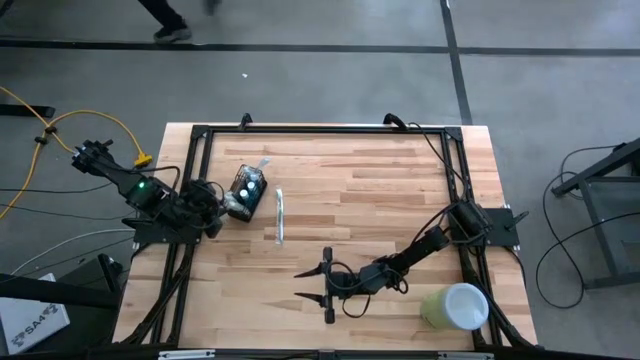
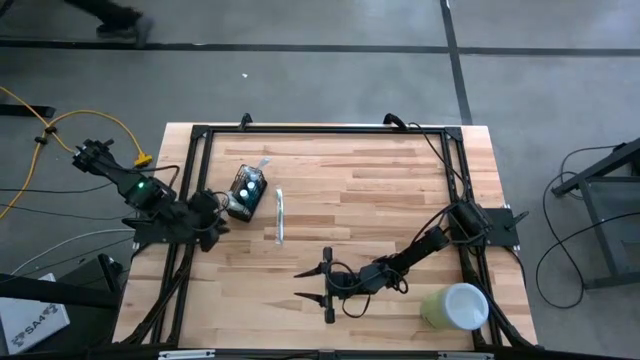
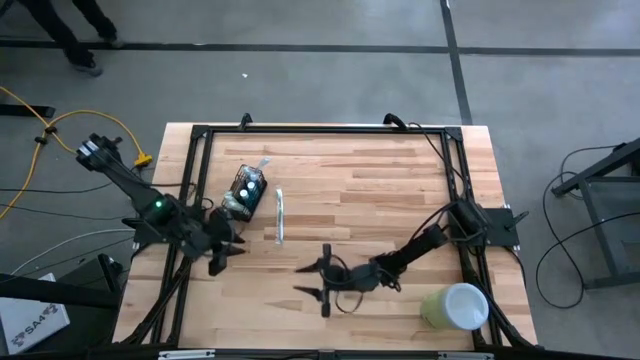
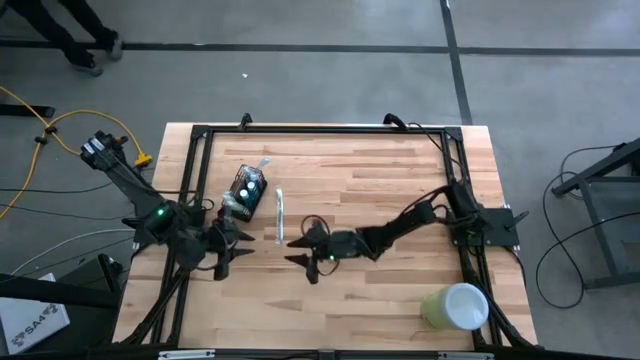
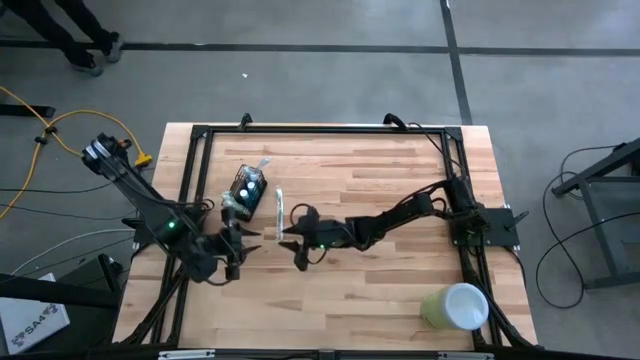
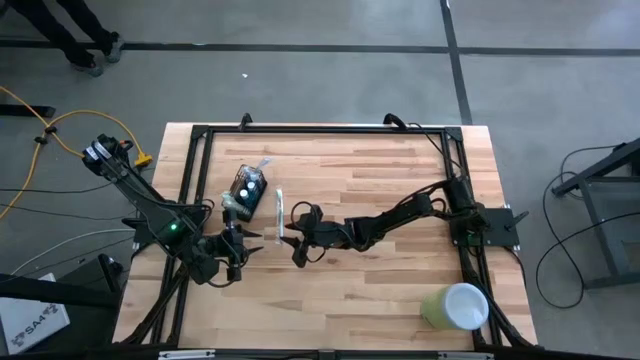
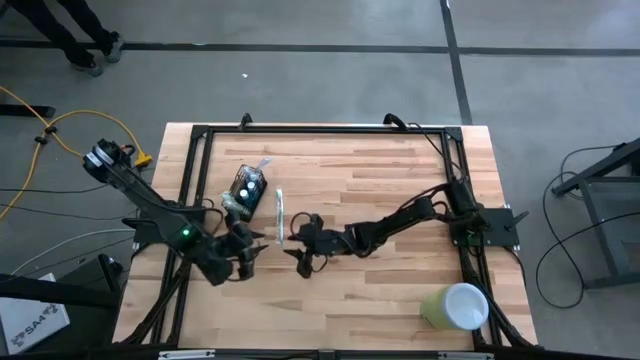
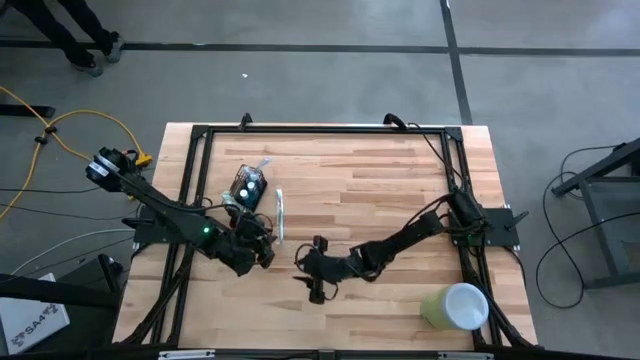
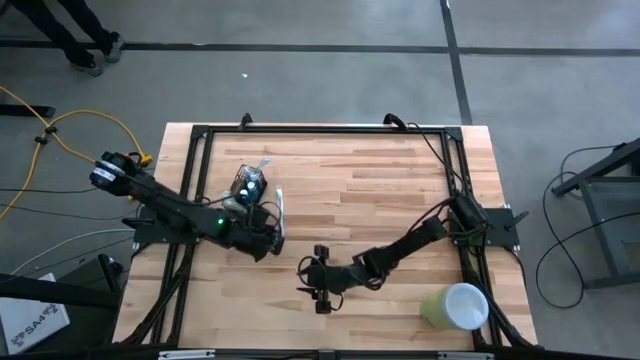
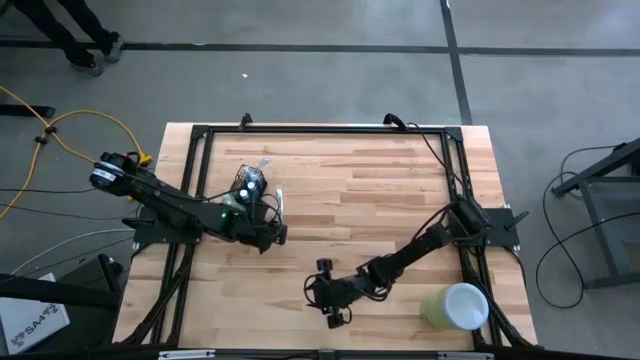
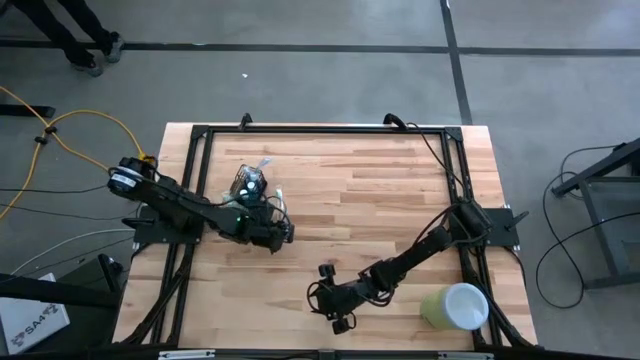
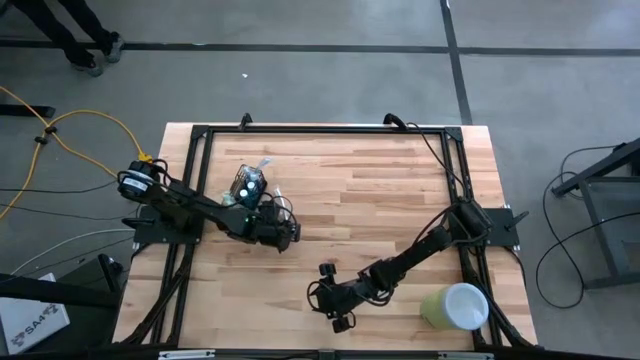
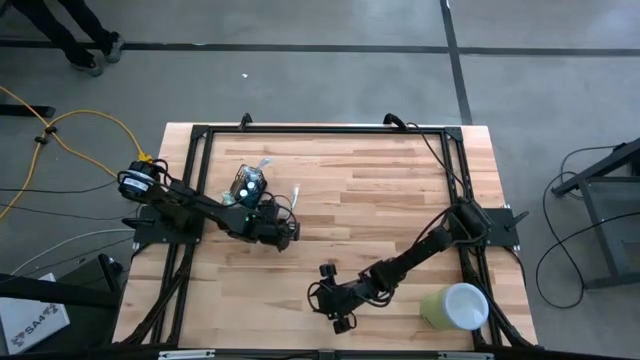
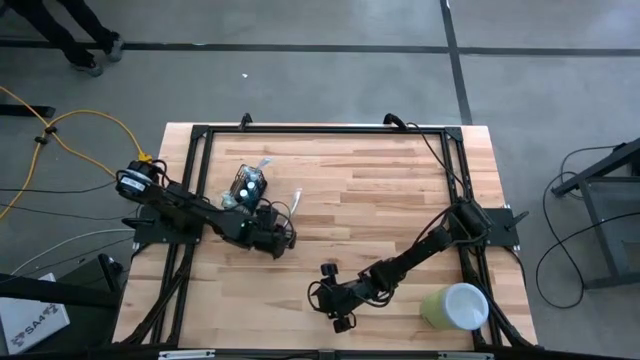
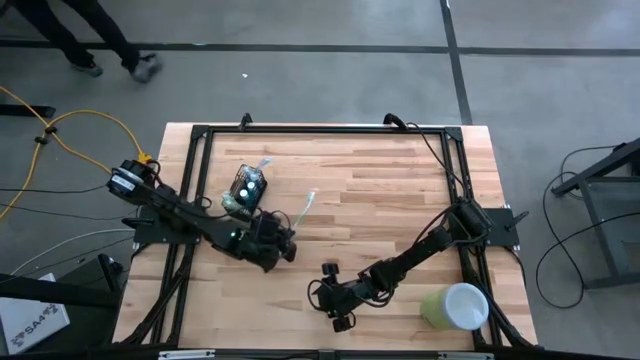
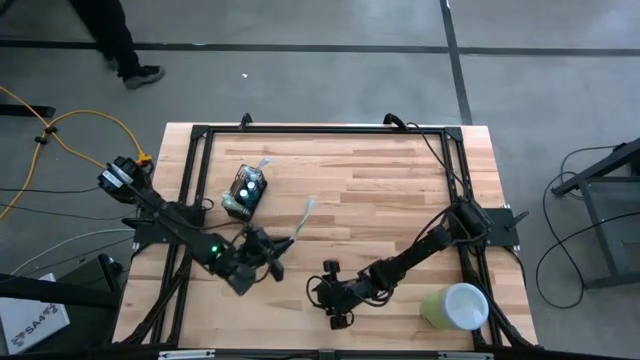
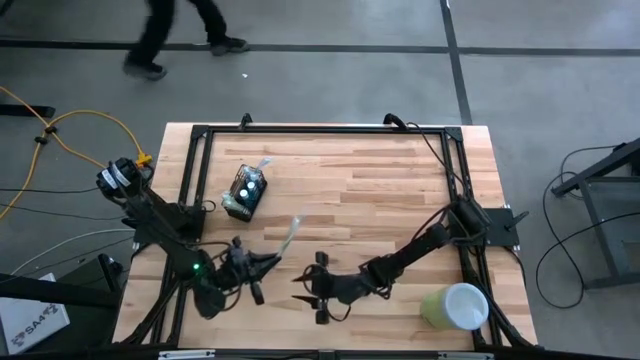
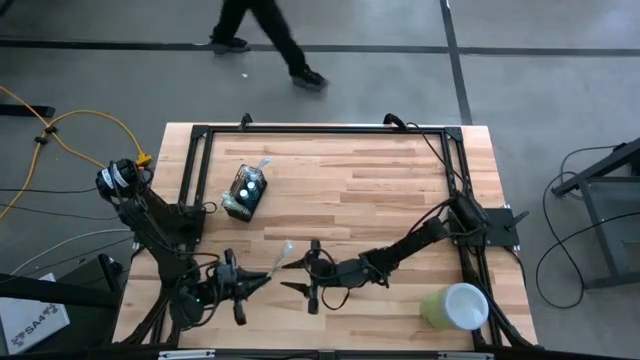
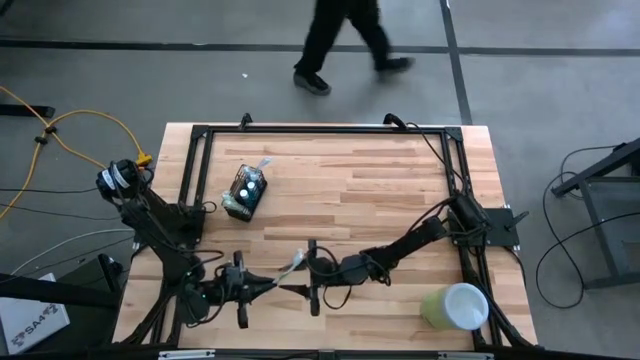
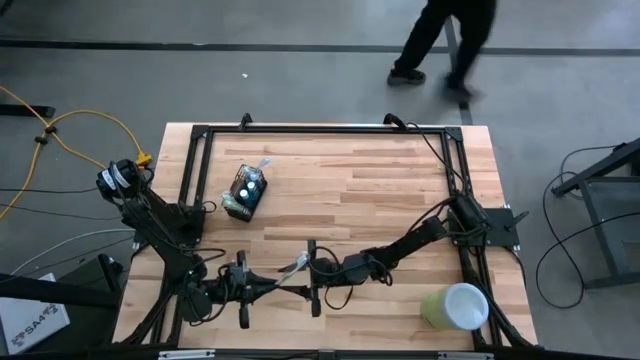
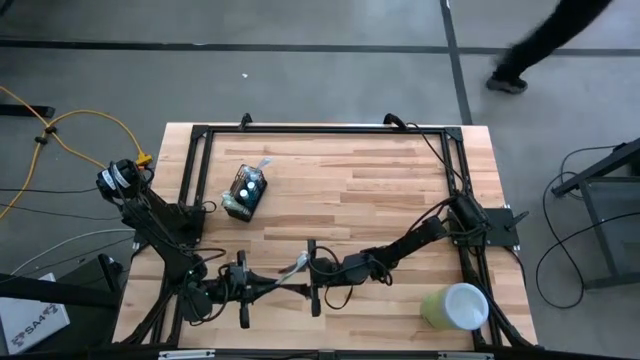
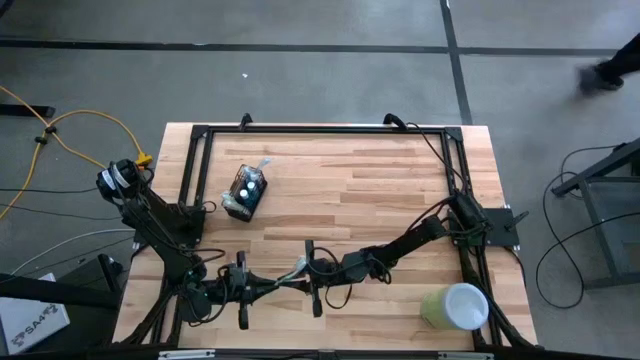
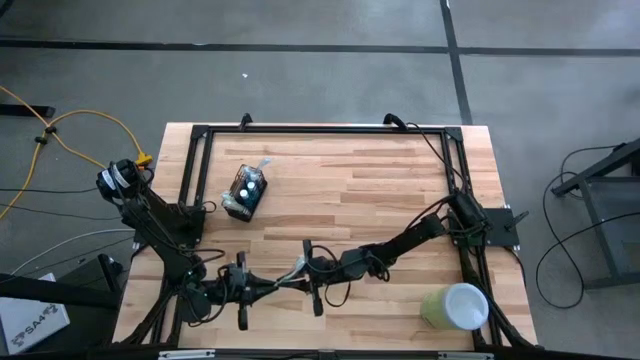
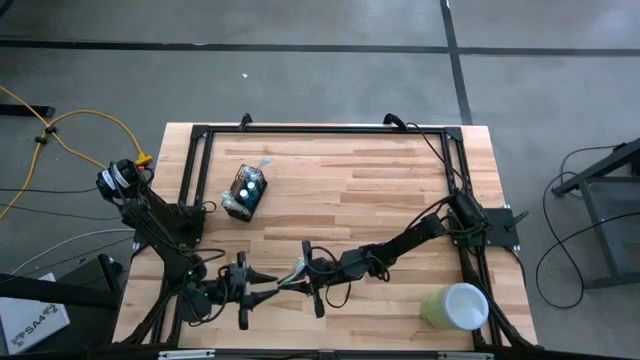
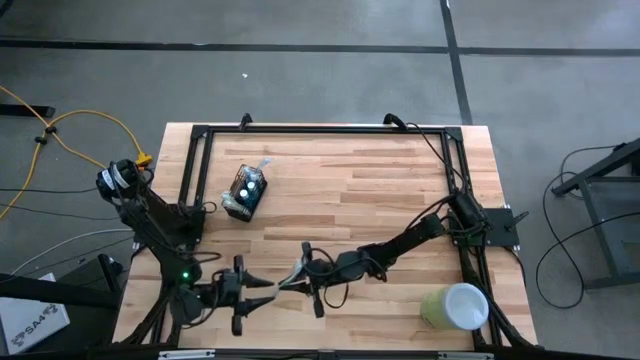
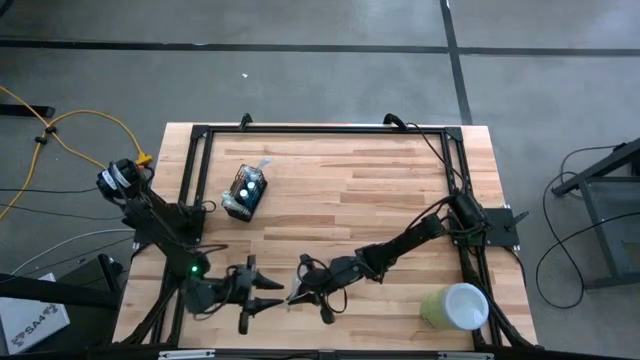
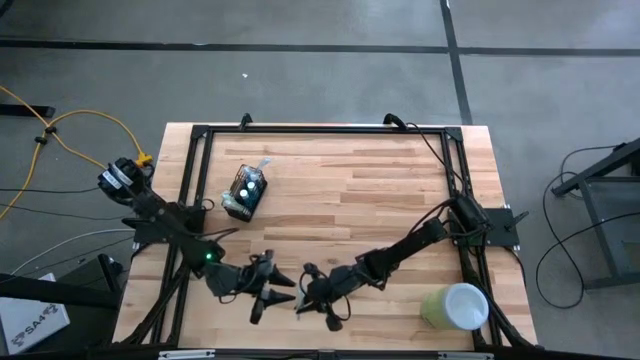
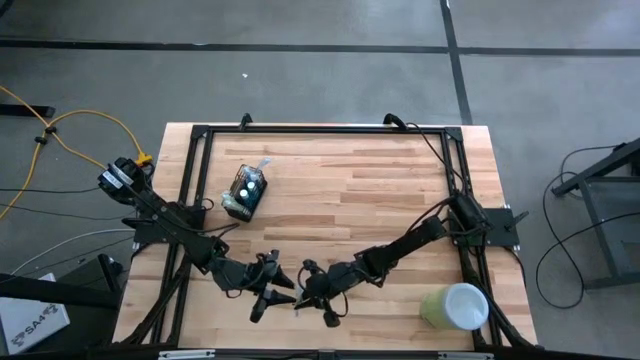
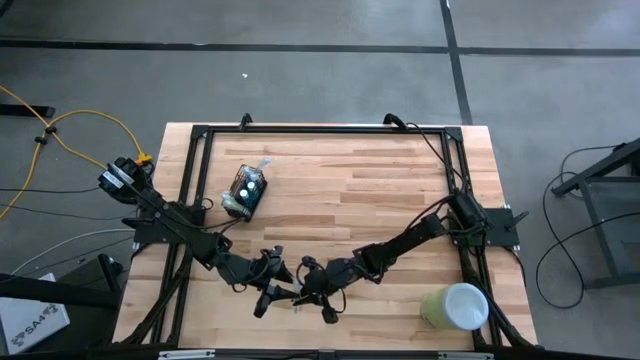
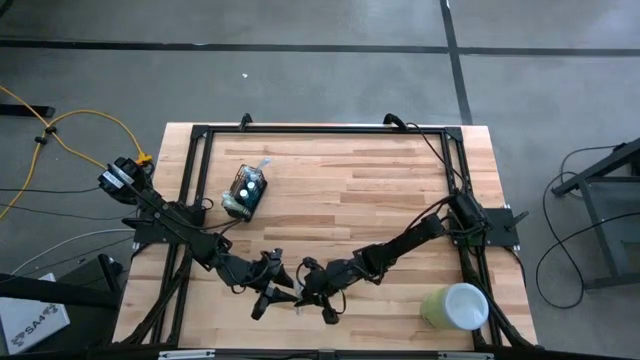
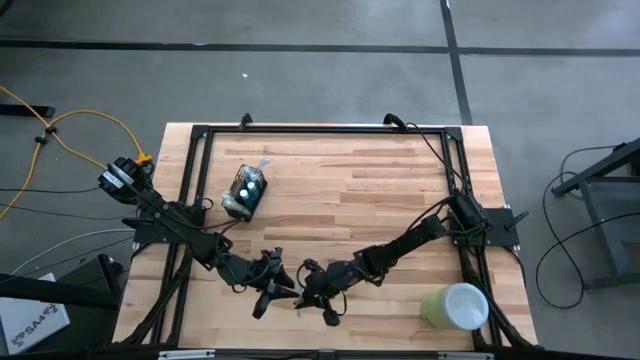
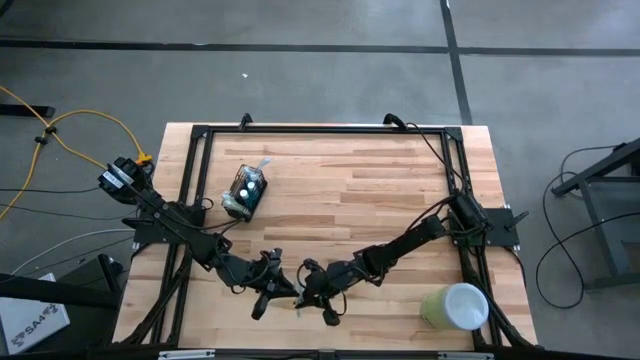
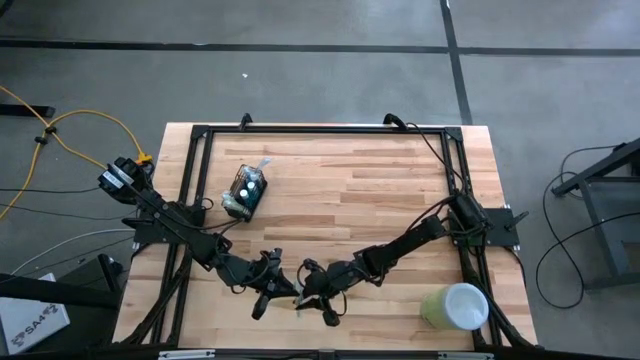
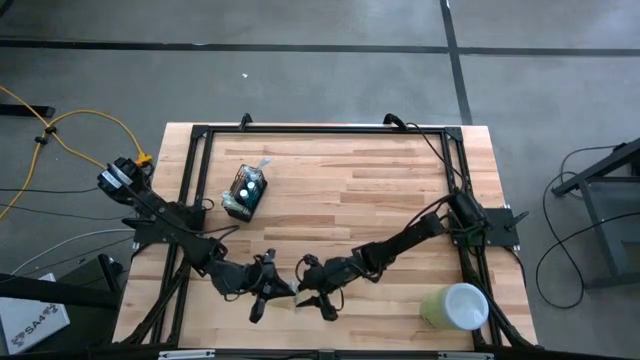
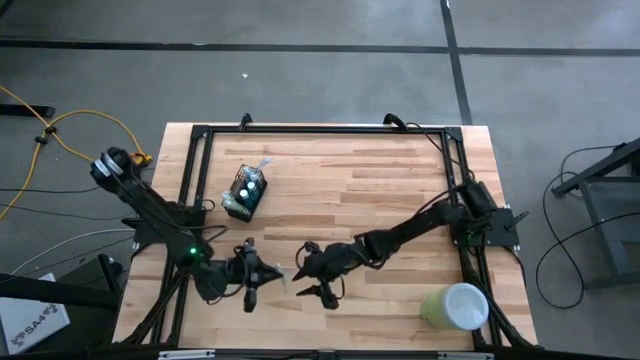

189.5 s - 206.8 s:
Task: Pick & Place toothbrushing station
Put the green toothbrush into the black wire organizer

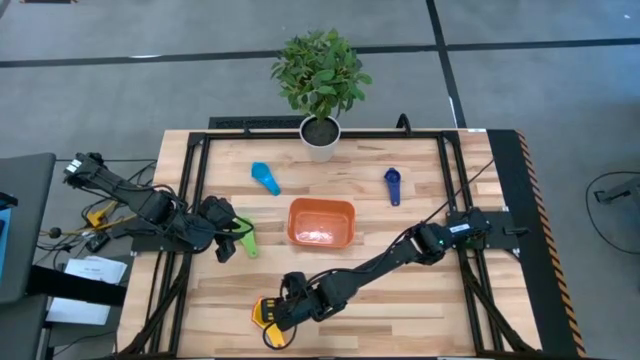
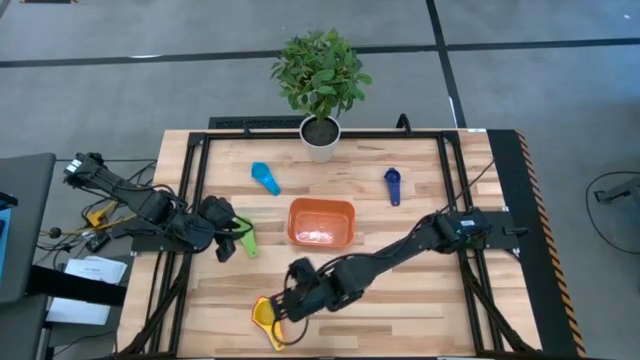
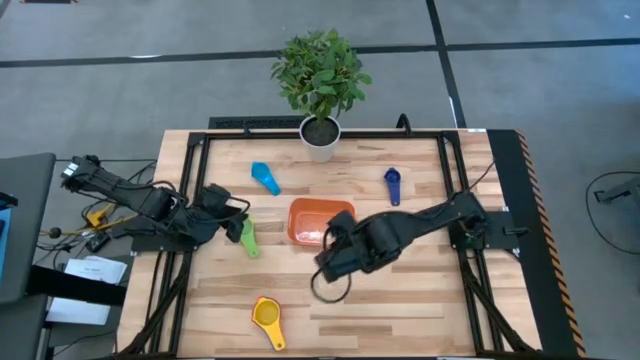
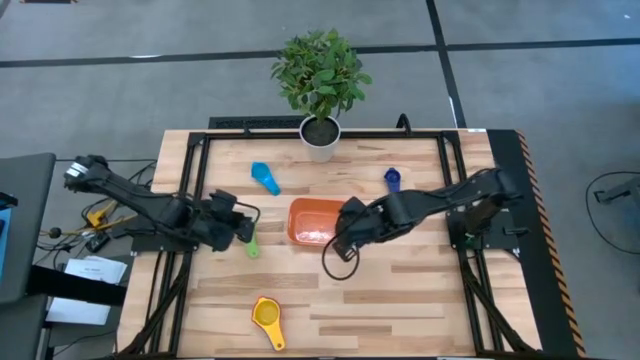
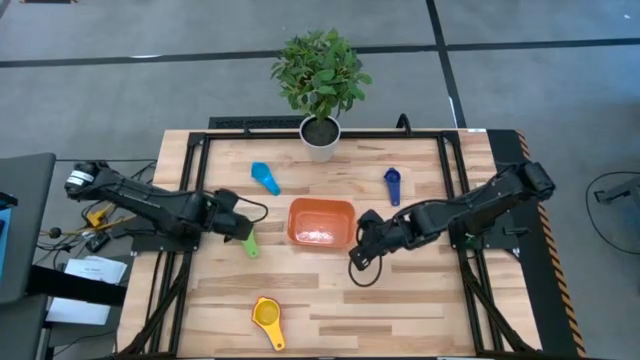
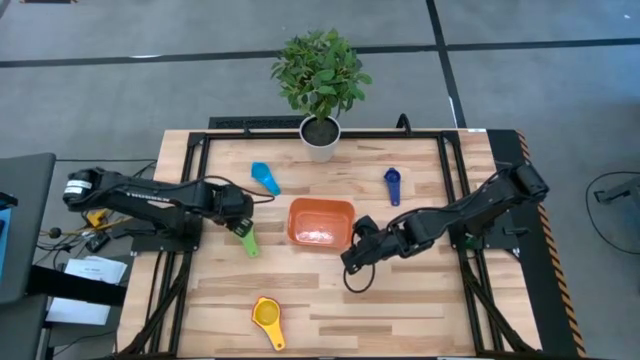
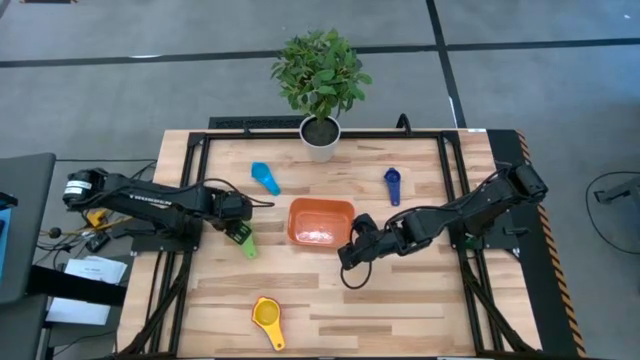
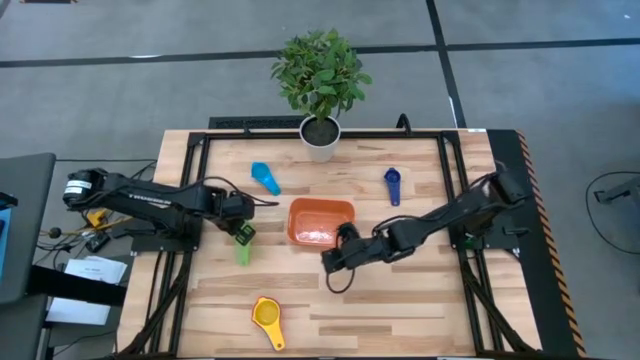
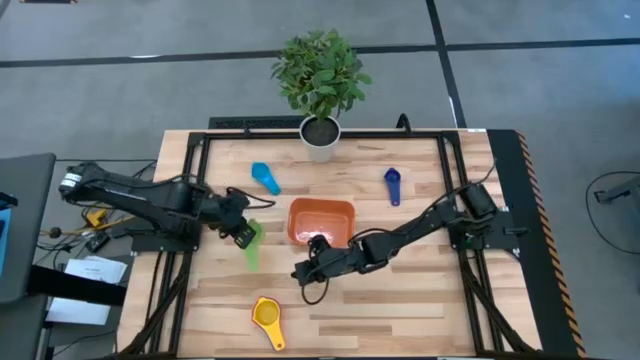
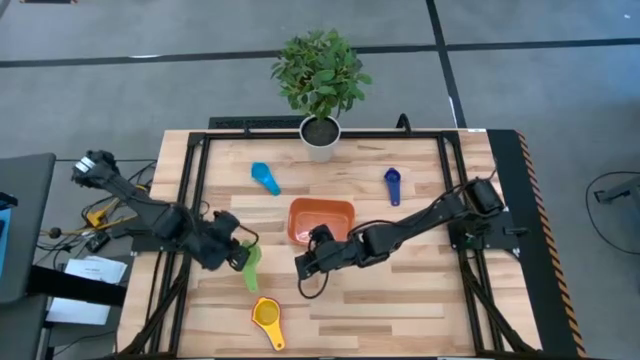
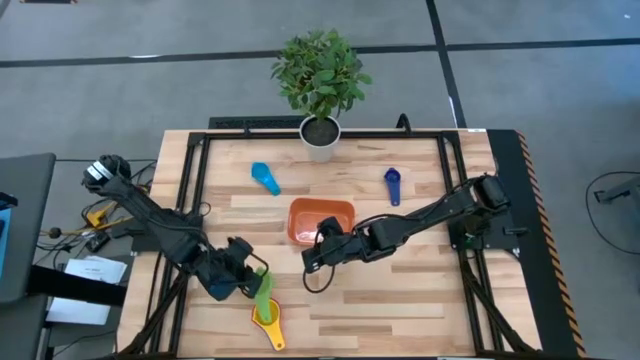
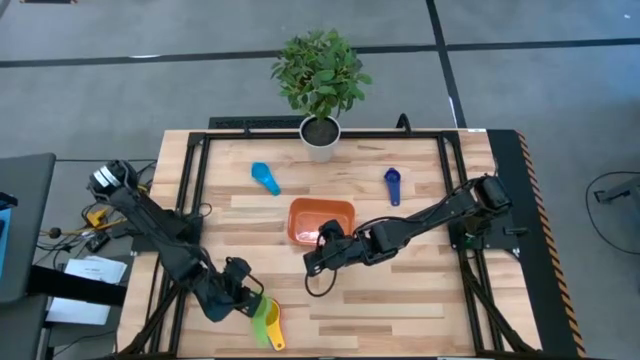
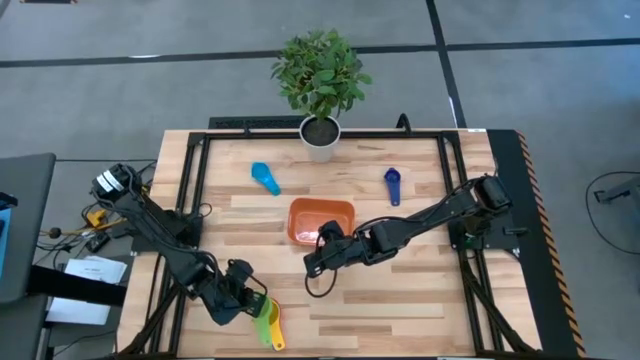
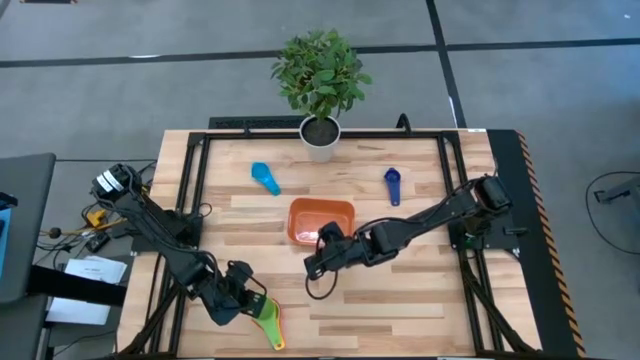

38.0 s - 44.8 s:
Task: Nest measuring cups in basket
Stack the green measuring cup on top of the yellow measuring cup
